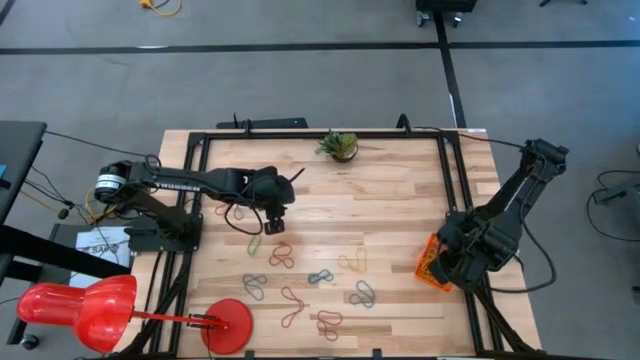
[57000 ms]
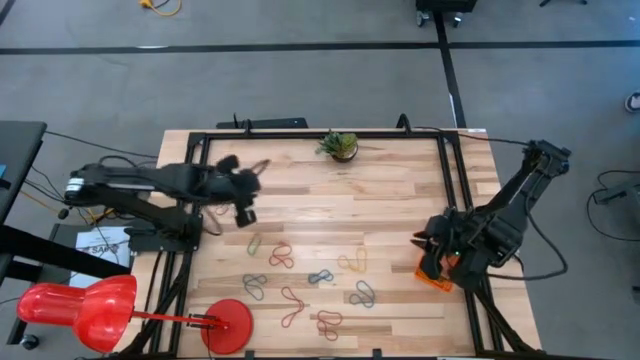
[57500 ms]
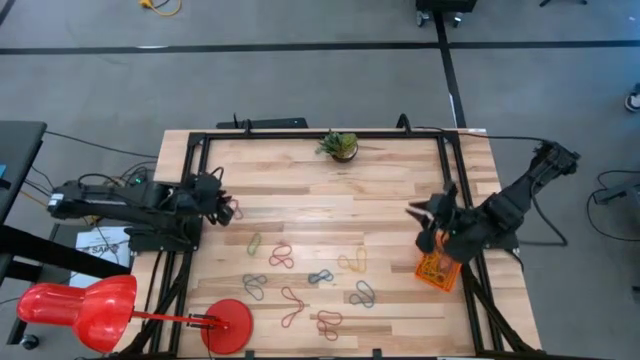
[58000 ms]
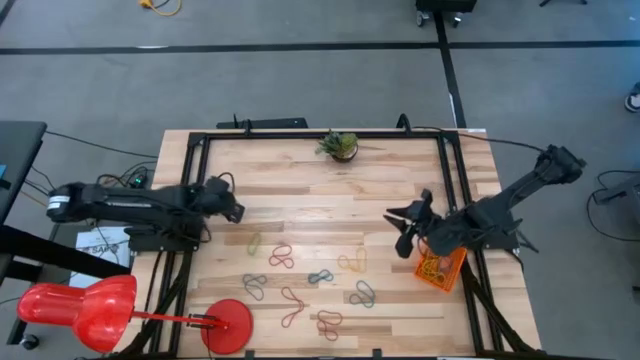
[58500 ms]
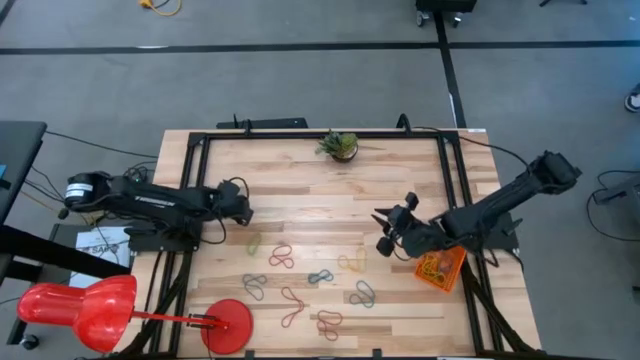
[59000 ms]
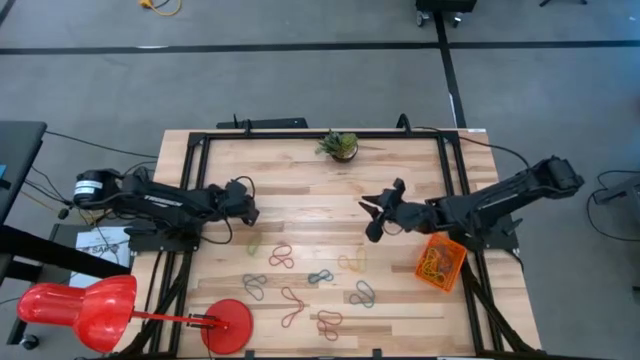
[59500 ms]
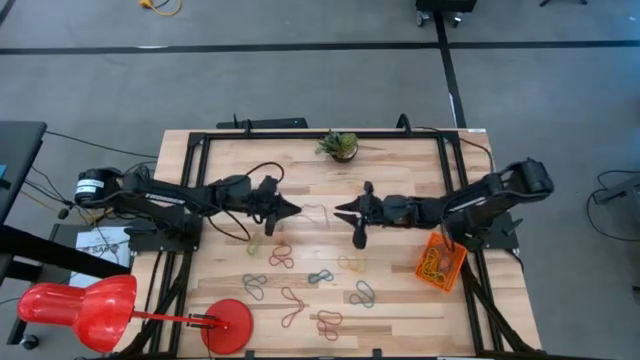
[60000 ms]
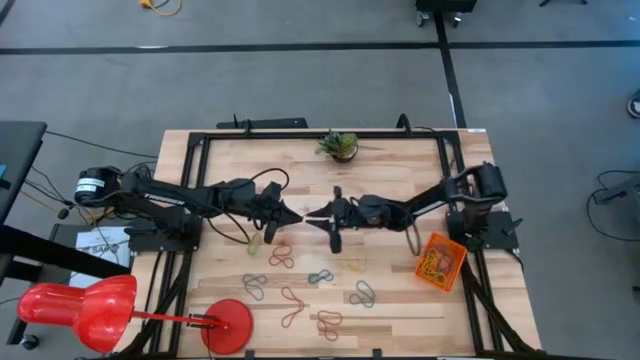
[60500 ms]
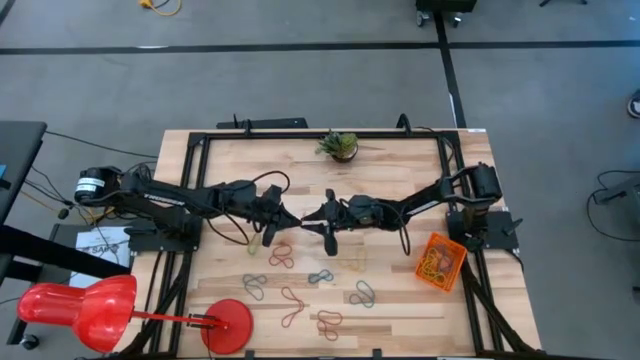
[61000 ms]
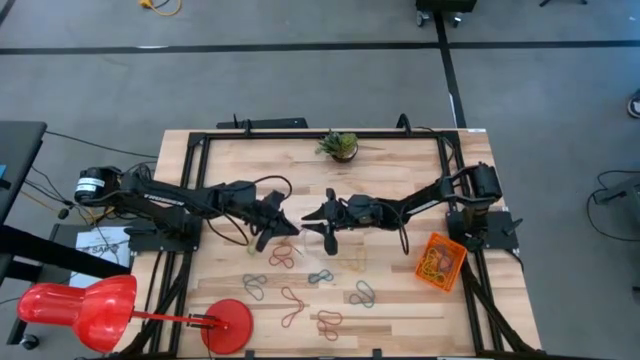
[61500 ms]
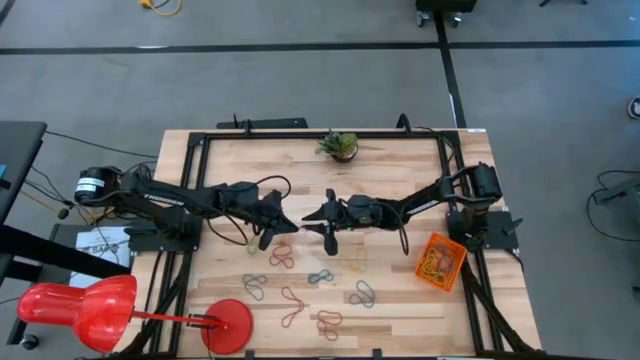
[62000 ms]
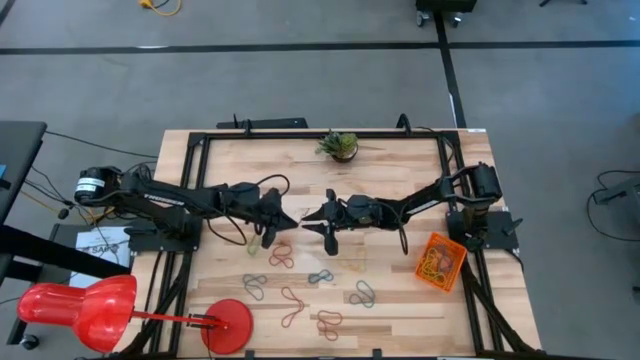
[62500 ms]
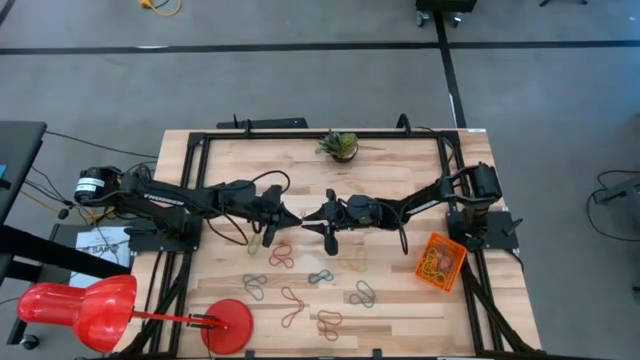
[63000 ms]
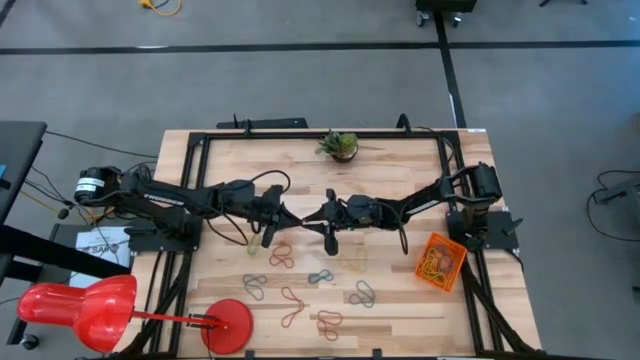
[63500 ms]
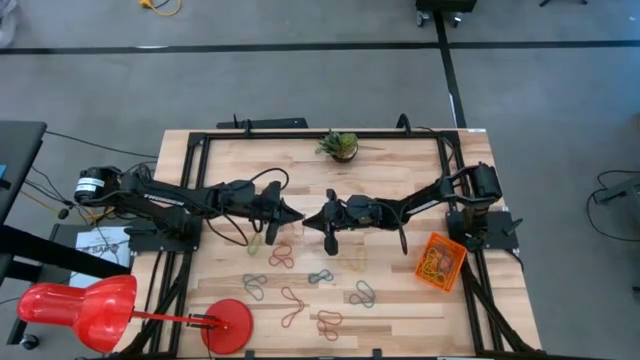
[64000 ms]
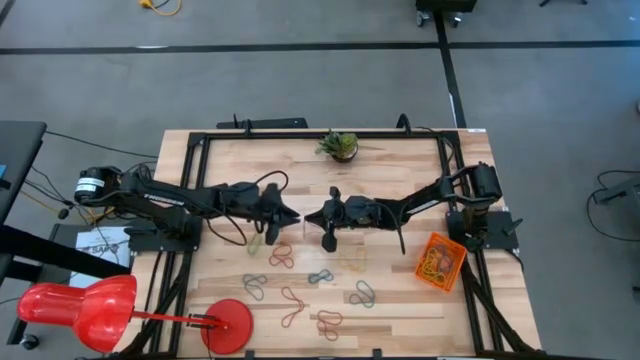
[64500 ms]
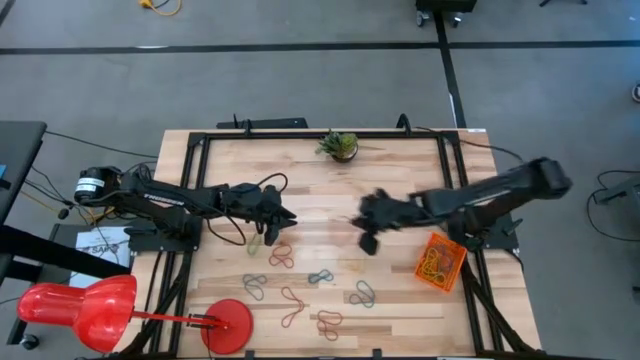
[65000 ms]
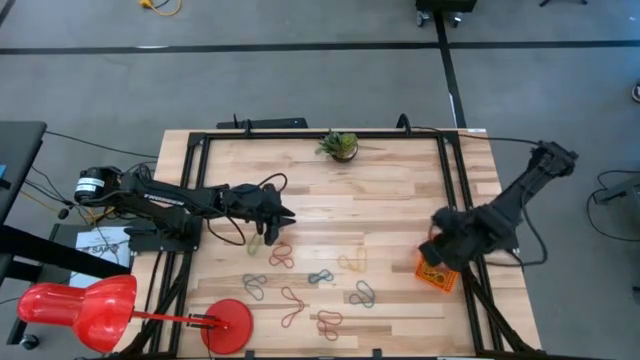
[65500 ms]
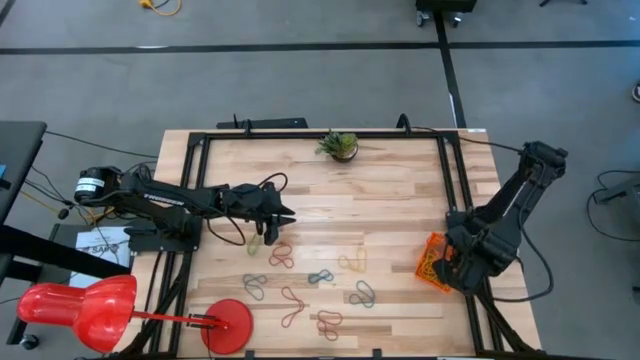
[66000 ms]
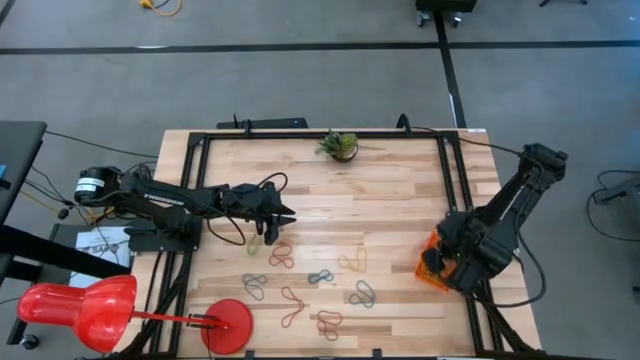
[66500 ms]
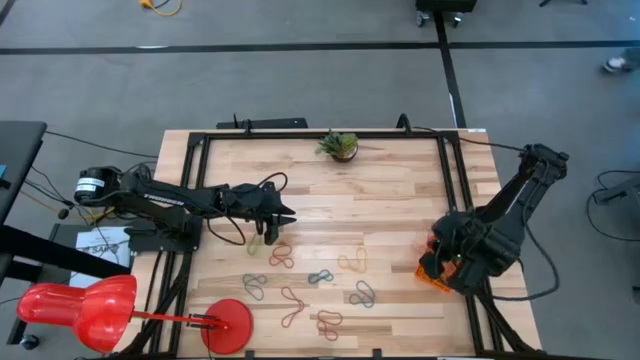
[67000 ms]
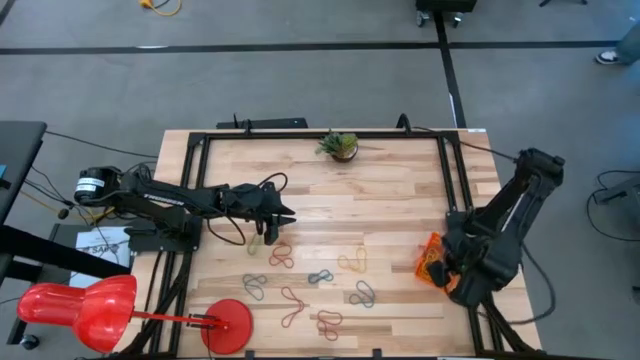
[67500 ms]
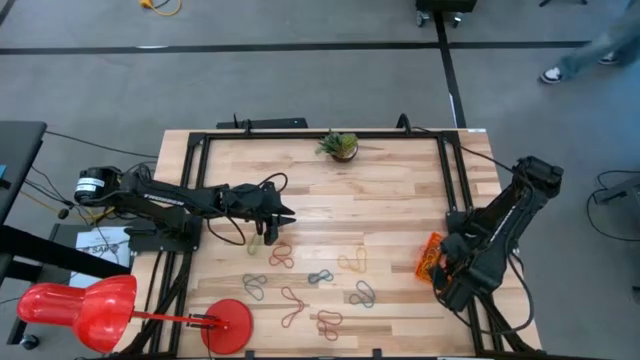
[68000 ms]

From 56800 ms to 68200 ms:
Task: Pick and place rubber bands into bin
Put the red rubber band into the orange basket

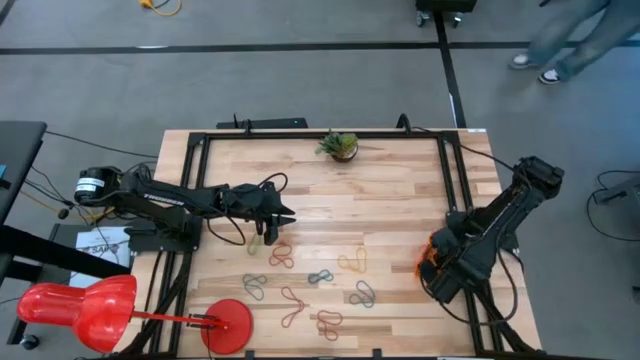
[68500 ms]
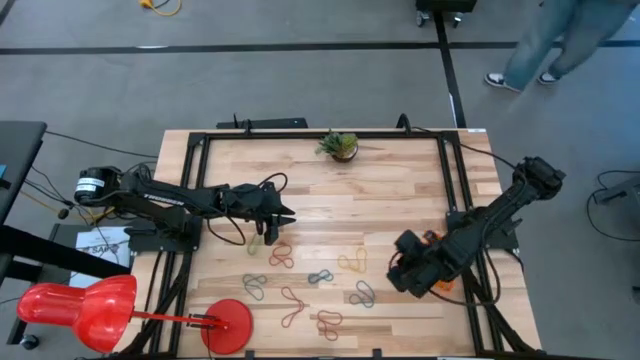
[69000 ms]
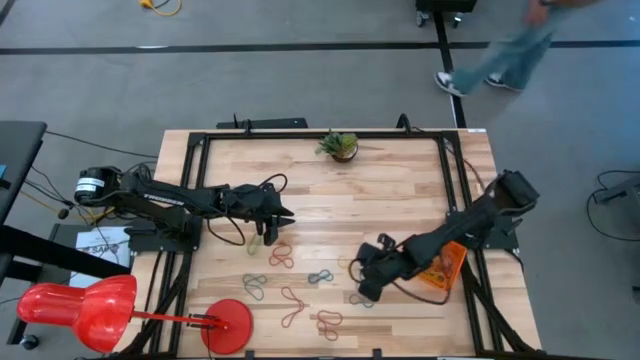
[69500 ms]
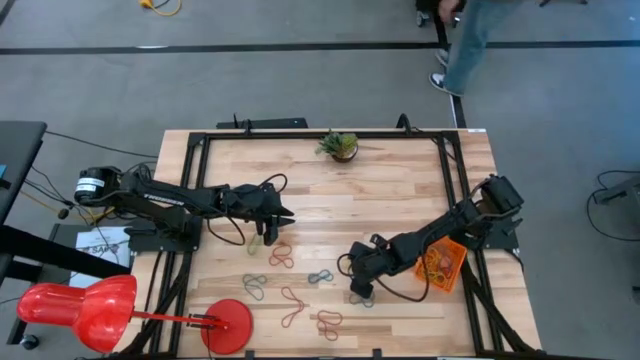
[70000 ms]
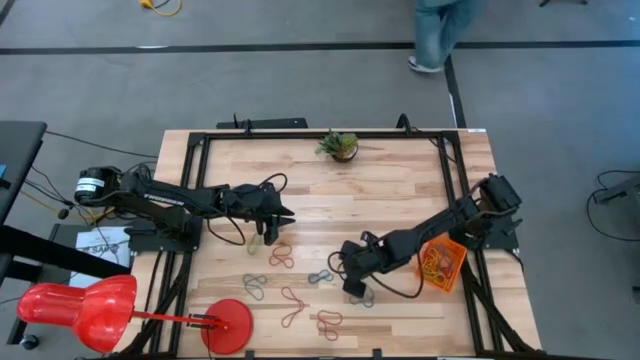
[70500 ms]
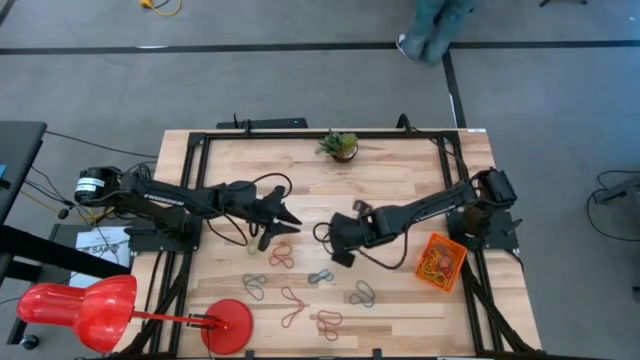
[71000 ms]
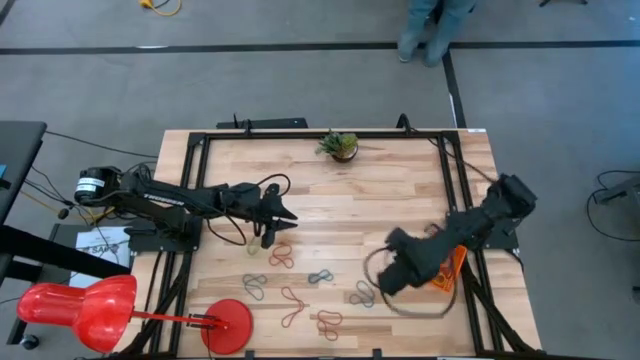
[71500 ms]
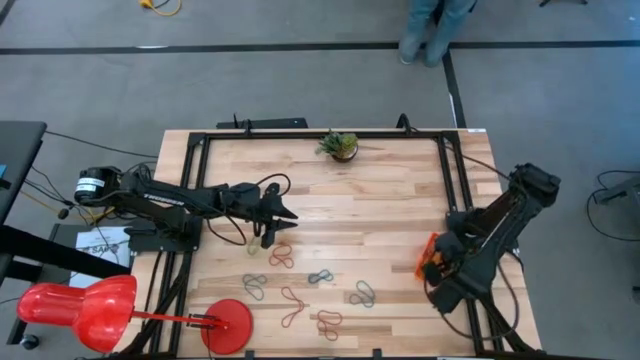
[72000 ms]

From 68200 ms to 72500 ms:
Put the yellow rubber band into the orange basket

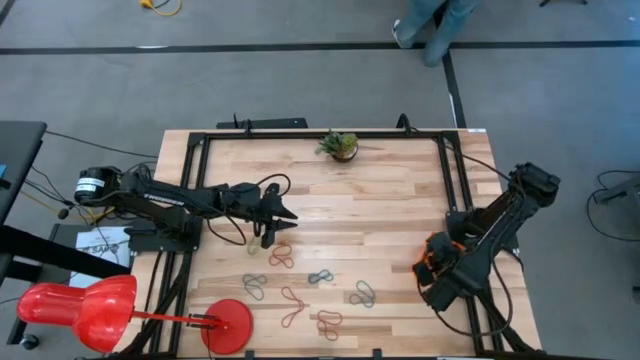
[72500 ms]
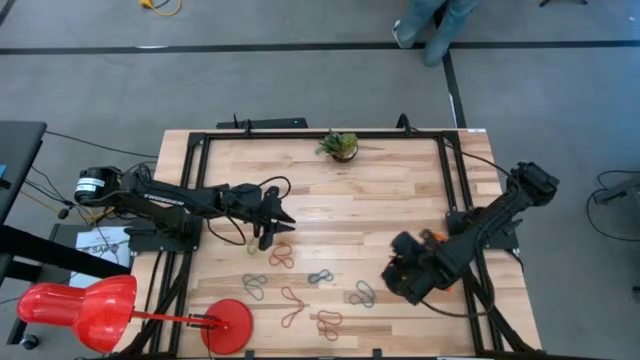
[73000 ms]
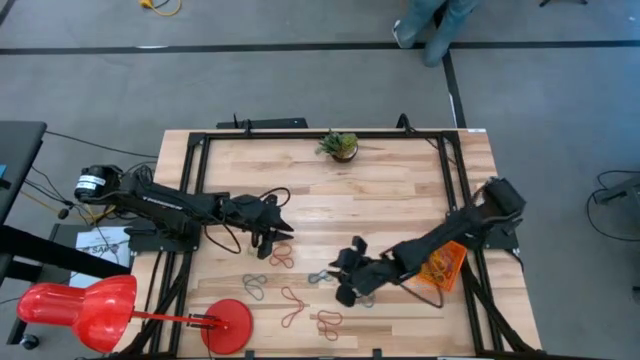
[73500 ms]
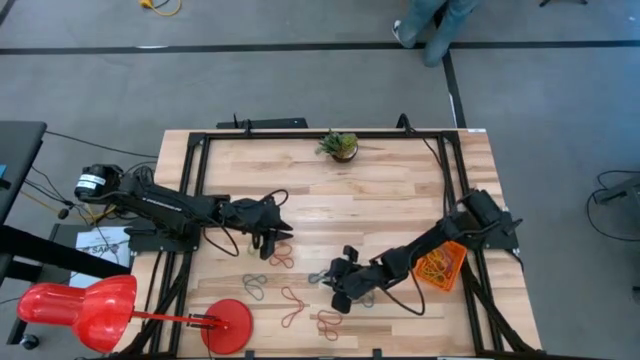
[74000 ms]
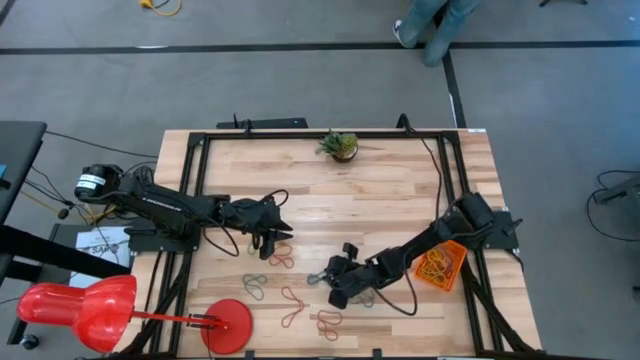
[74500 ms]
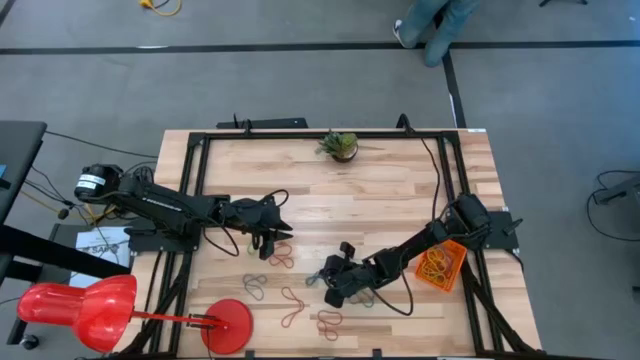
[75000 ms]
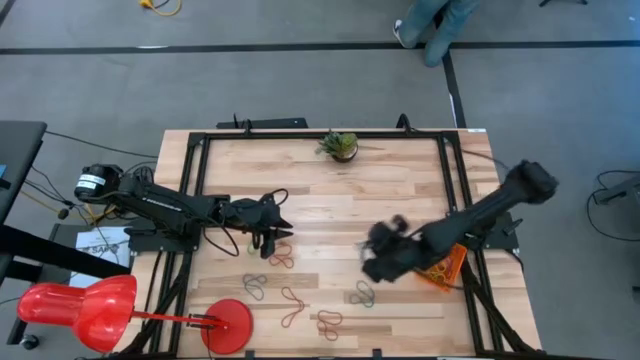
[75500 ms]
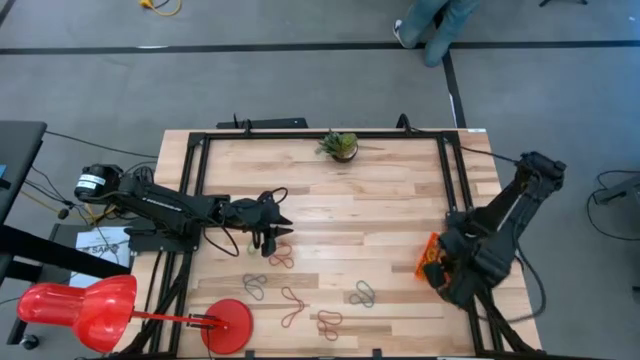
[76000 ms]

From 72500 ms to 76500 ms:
Put the blue rubber band into the orange basket

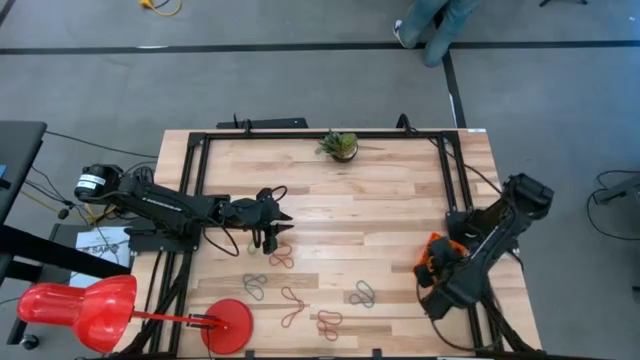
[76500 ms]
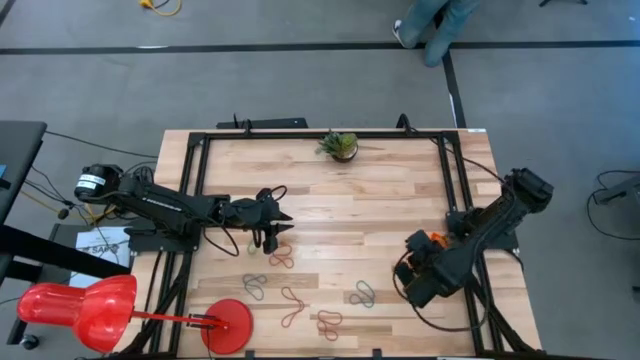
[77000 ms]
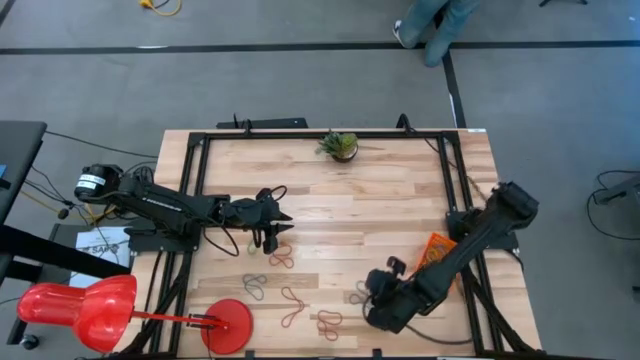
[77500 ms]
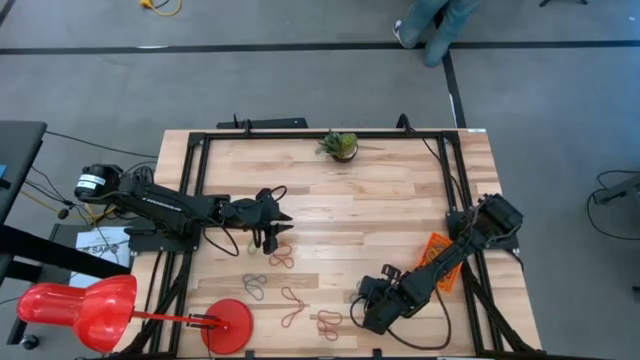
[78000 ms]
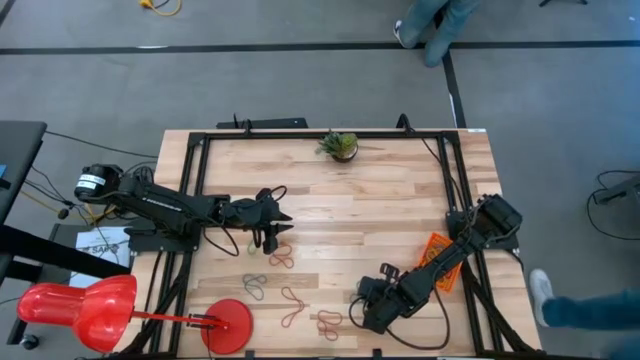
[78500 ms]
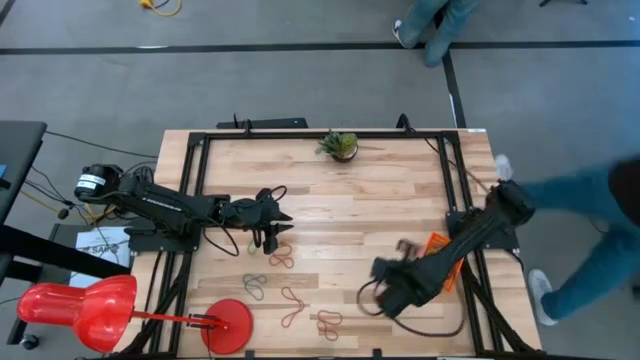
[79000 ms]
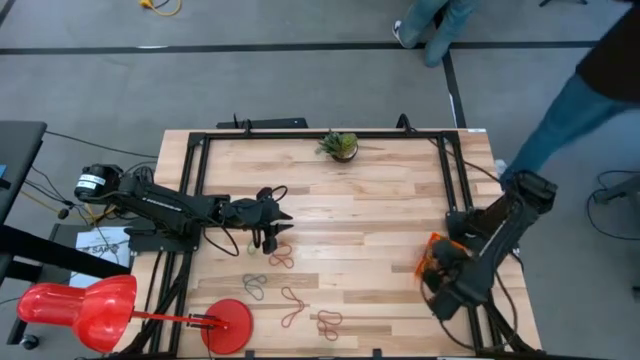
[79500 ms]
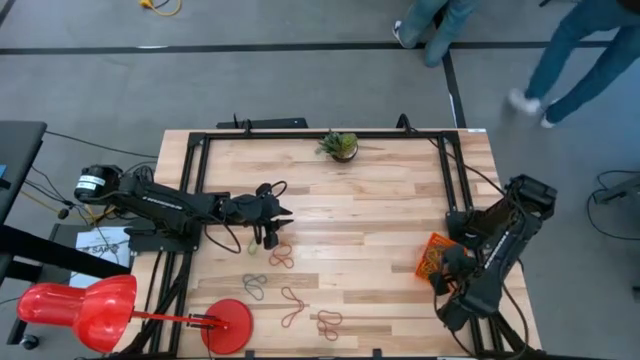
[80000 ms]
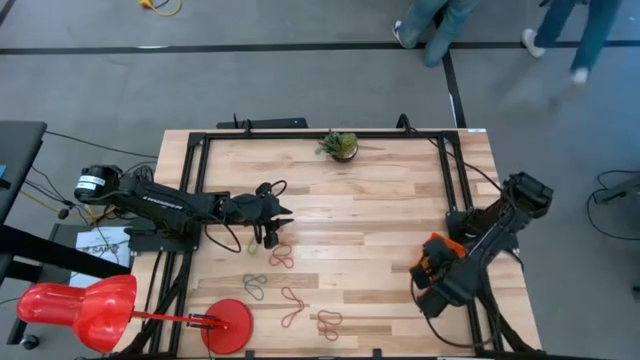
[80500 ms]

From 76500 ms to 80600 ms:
Put the blue rubber band into the orange basket
